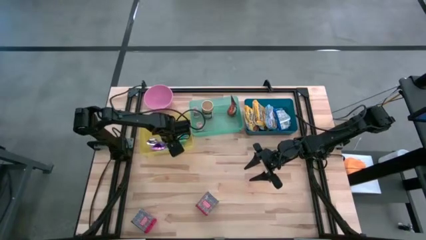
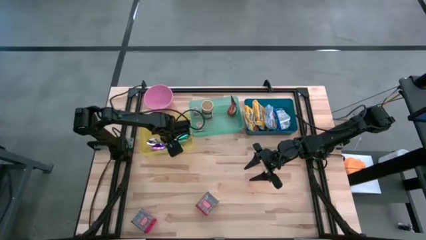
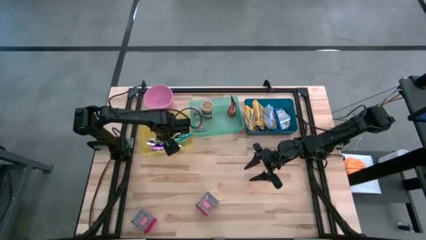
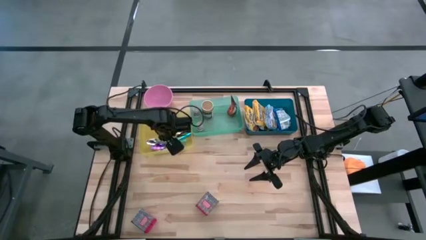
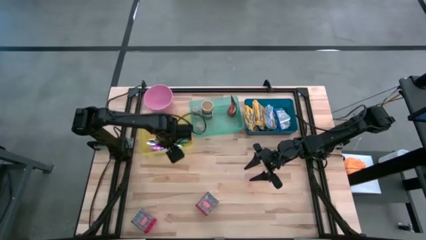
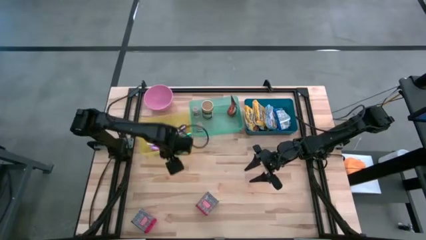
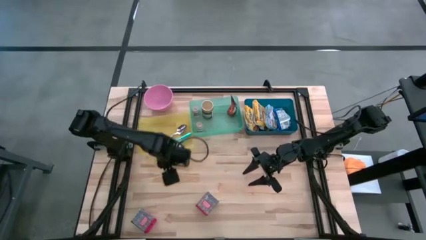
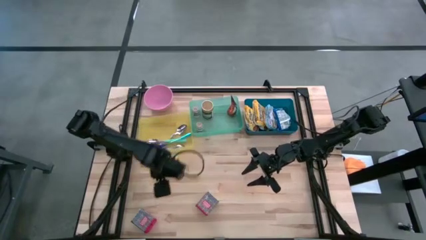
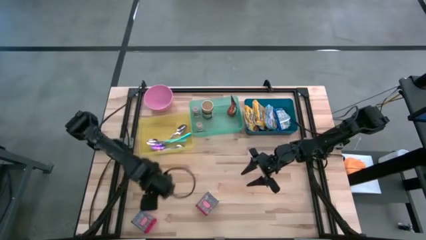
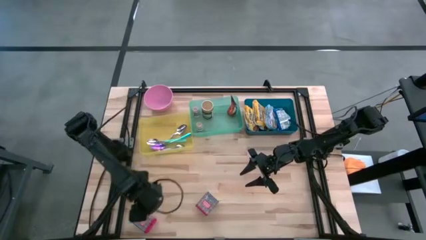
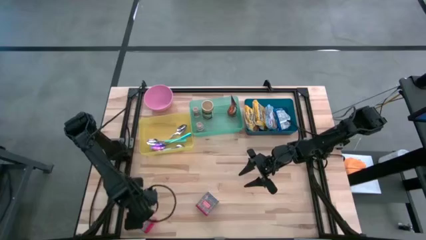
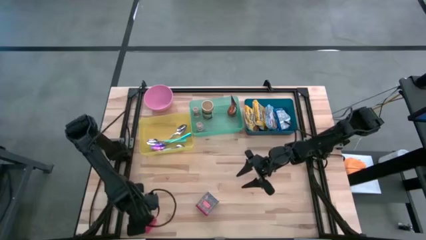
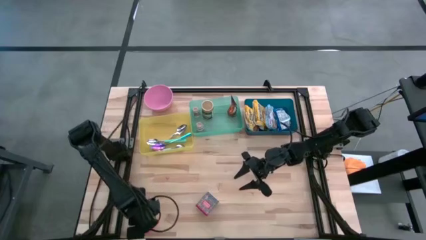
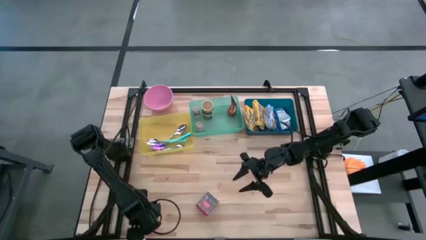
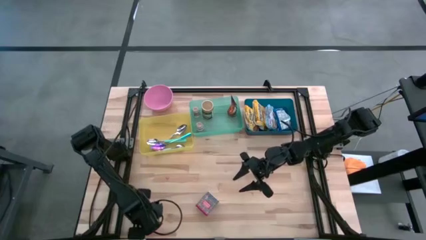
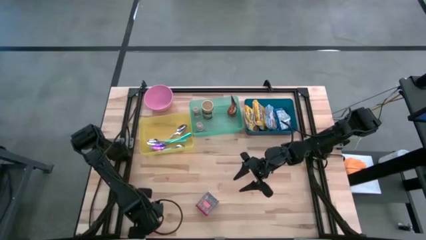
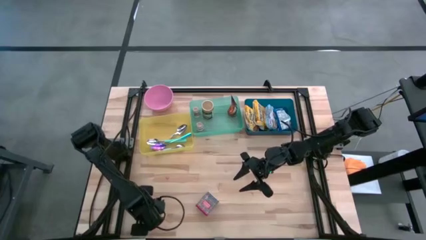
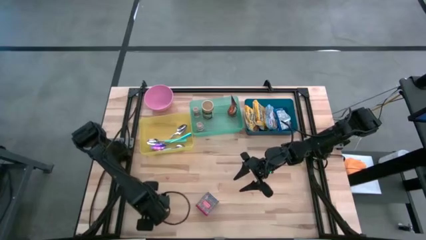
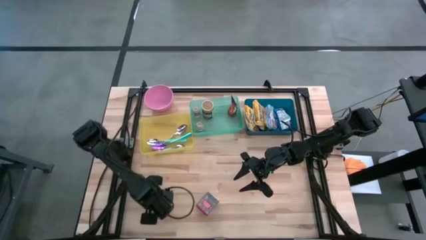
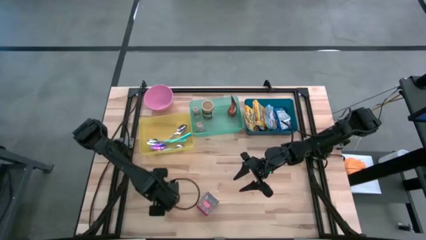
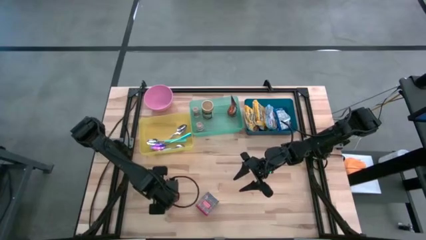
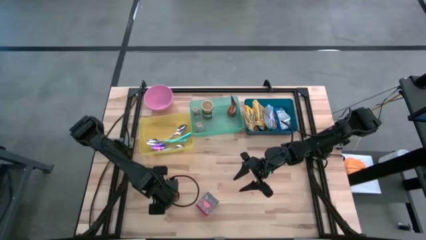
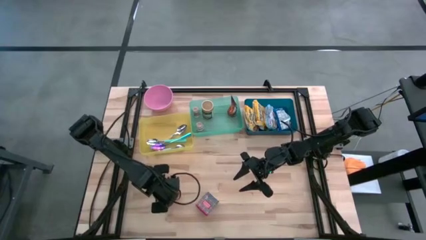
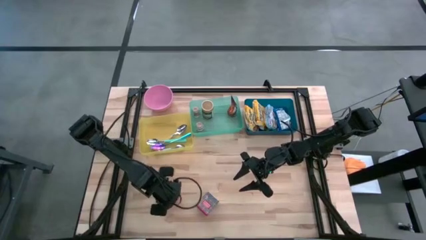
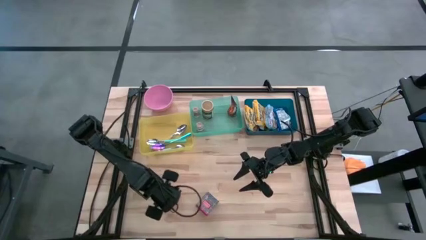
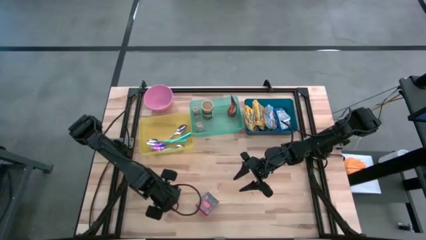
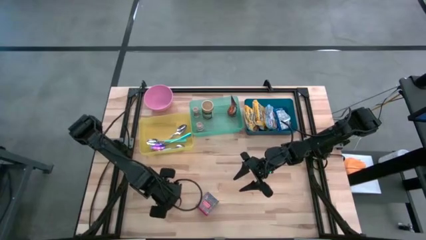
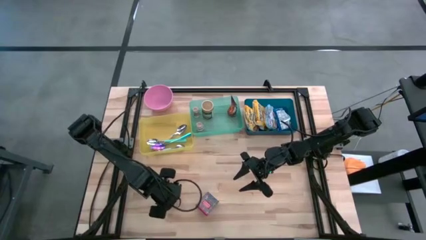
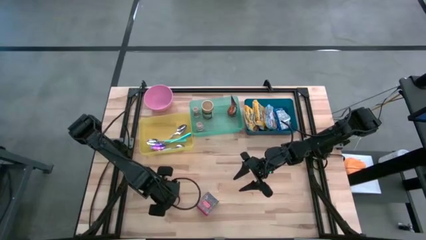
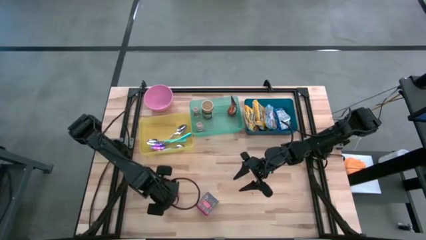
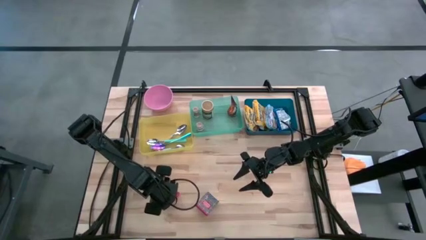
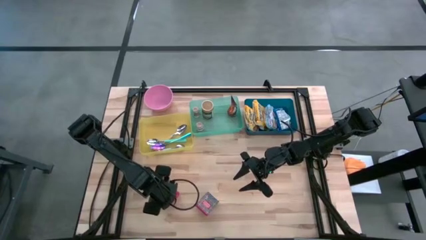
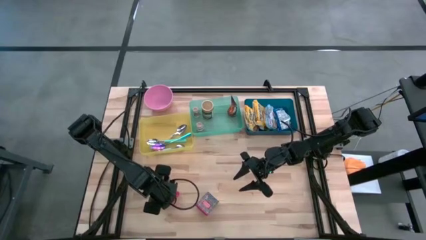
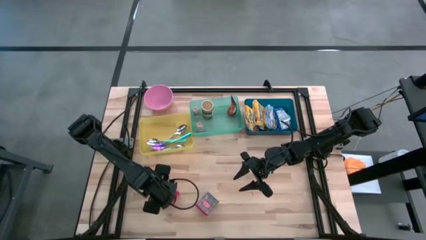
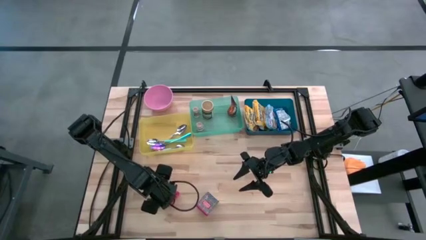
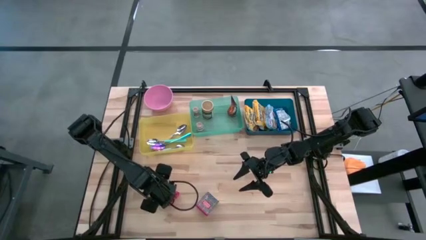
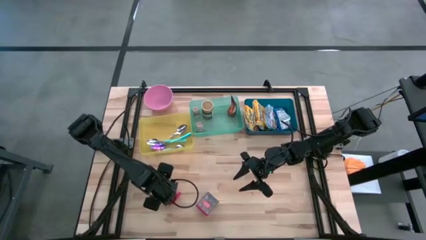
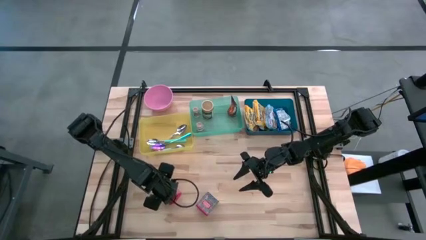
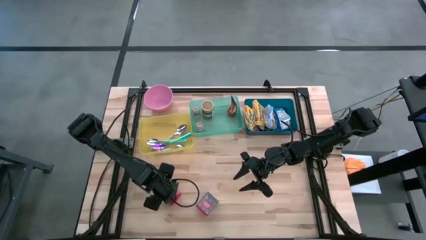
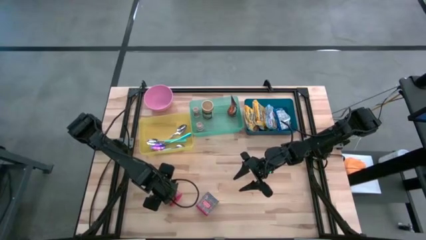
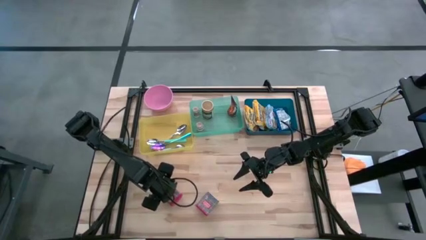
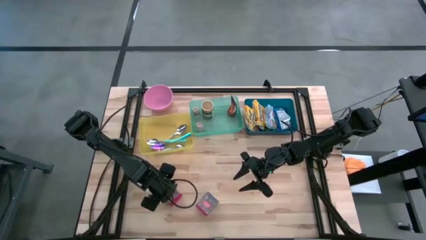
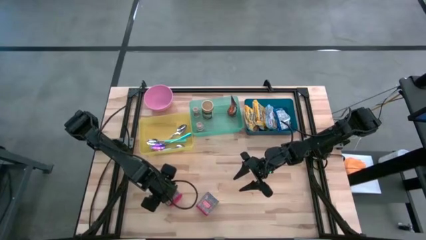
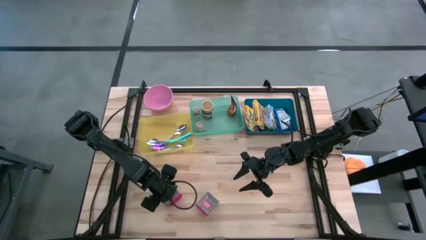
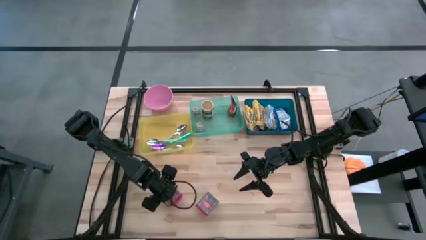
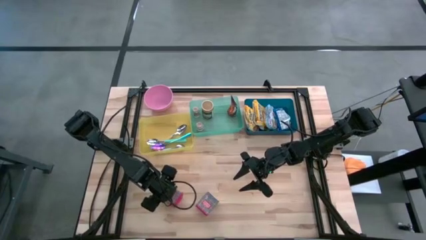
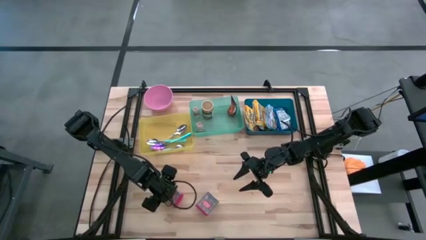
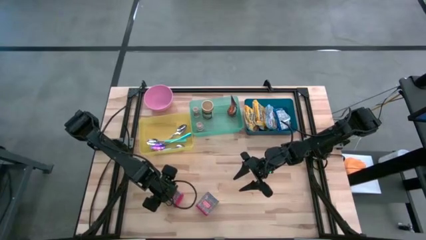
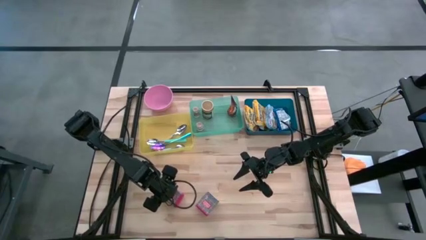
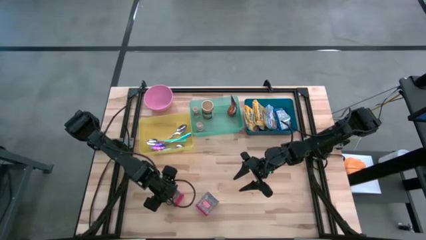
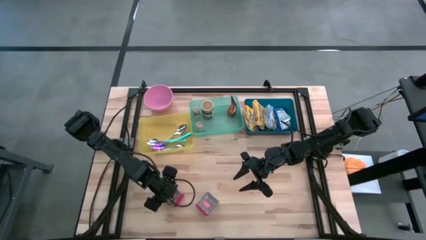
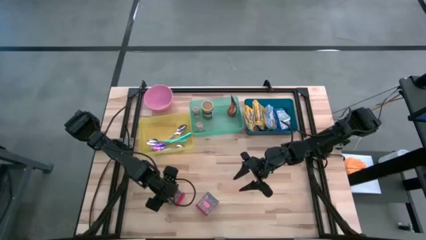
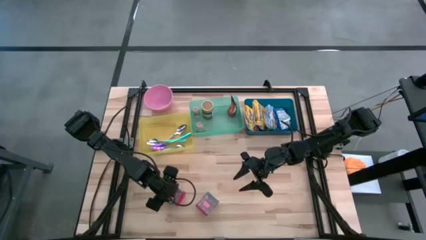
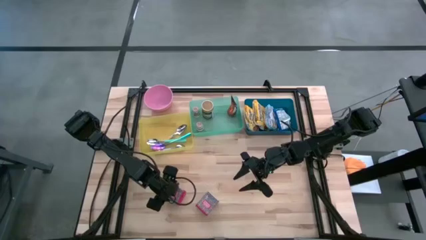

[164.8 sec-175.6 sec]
Put the left red seasoning can into the green bin
